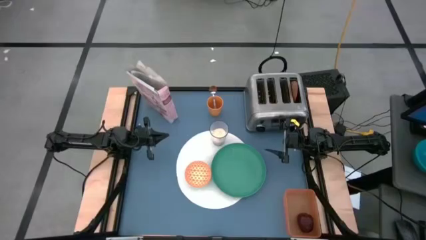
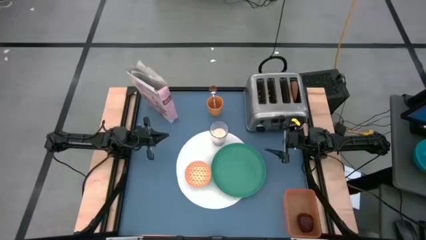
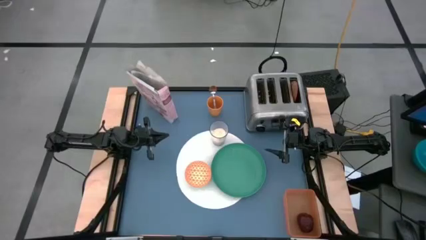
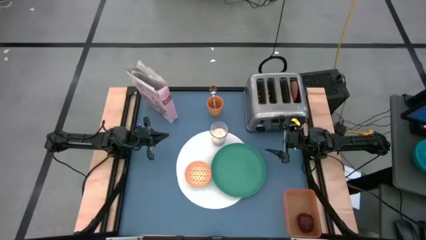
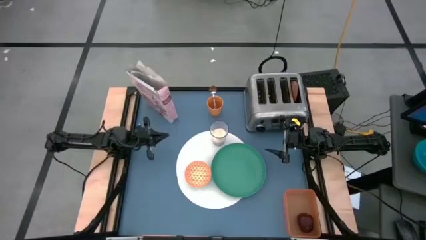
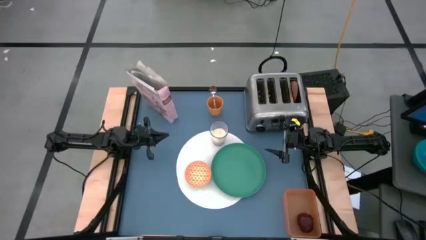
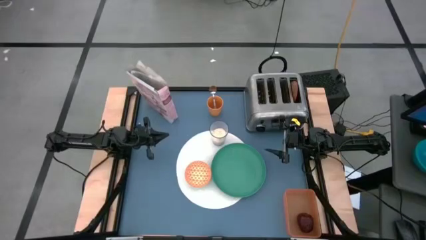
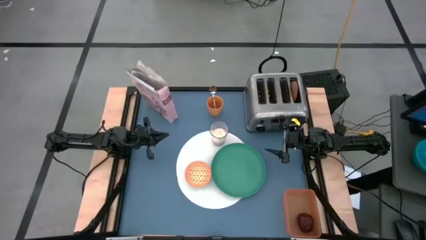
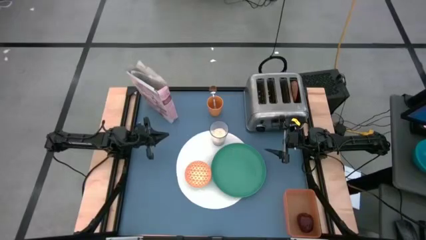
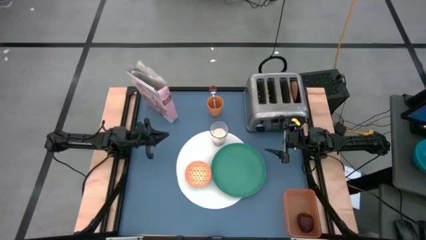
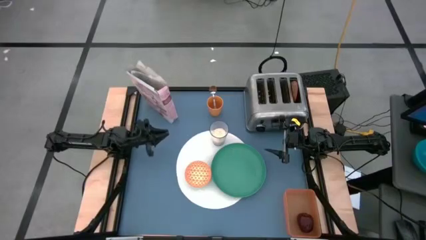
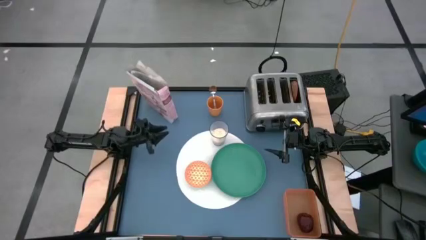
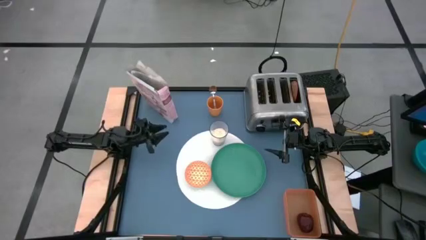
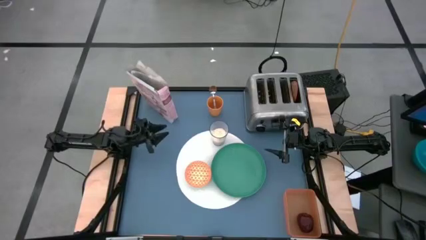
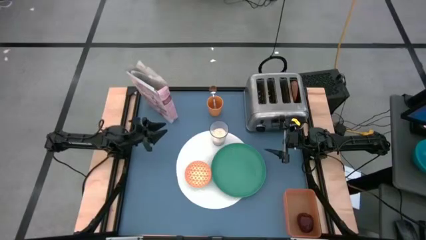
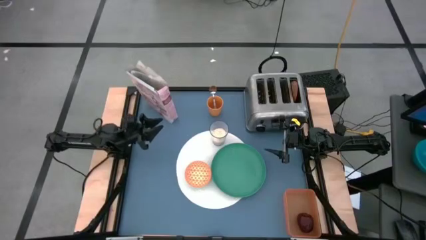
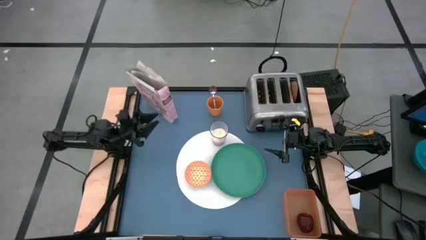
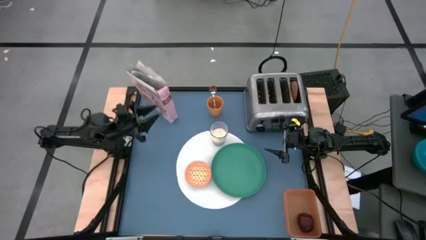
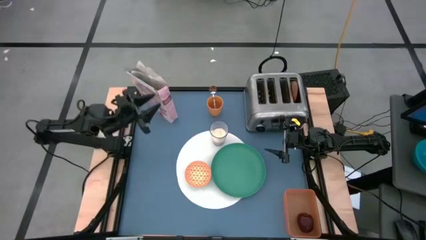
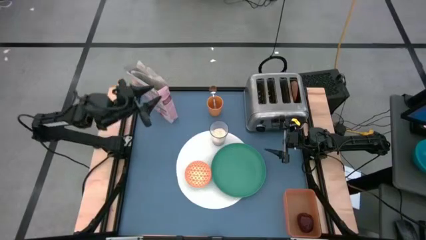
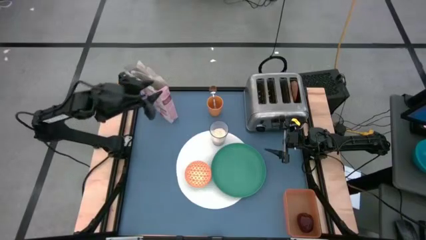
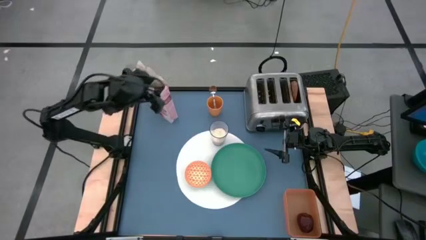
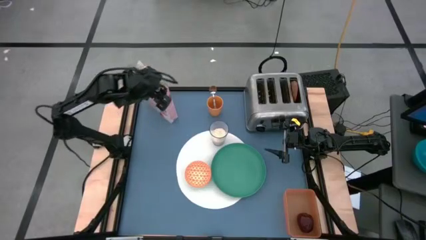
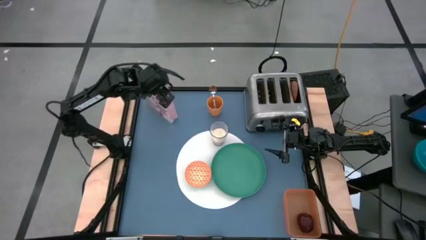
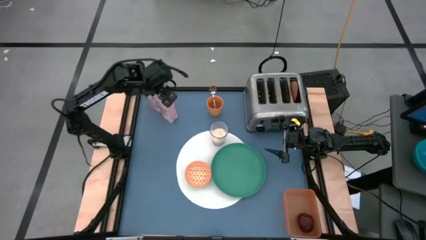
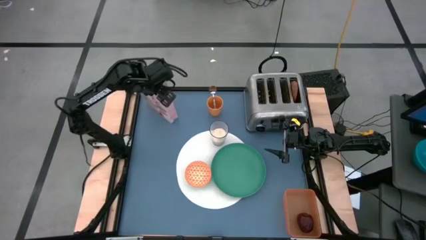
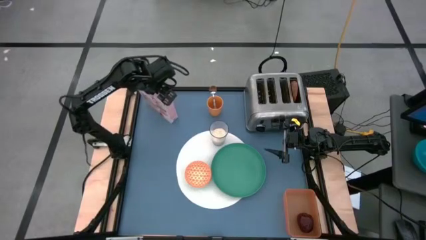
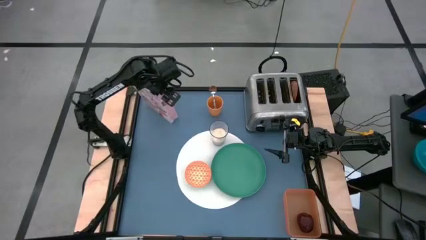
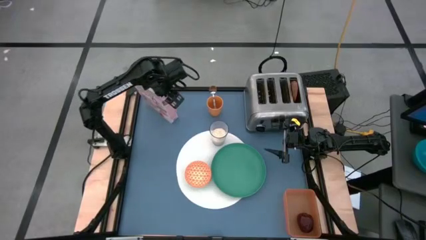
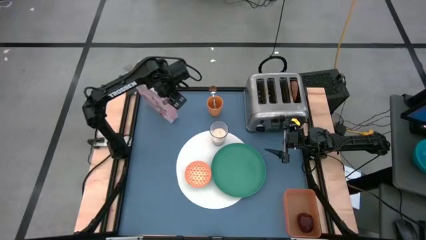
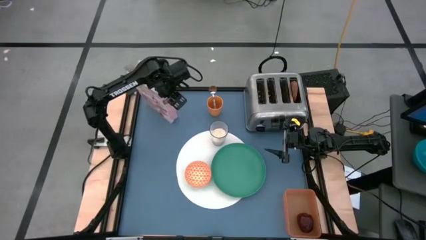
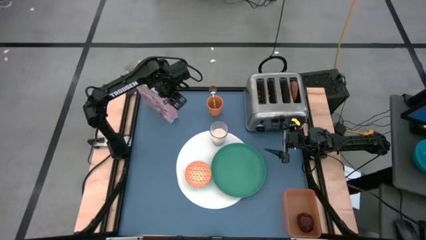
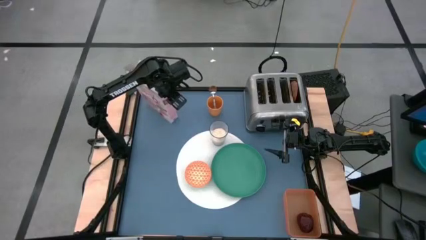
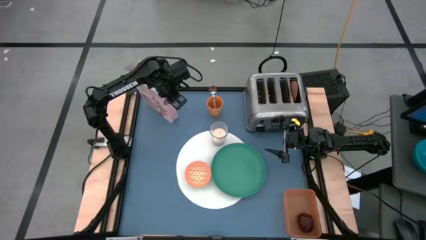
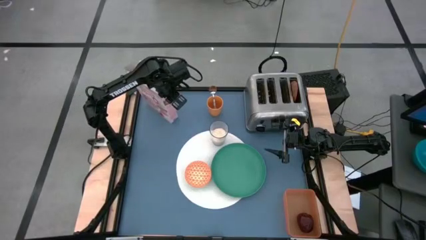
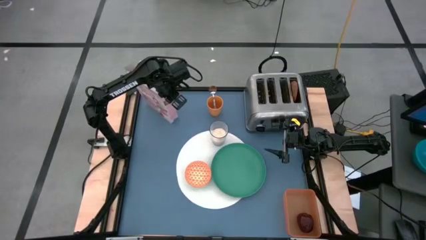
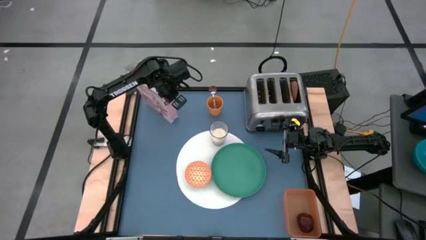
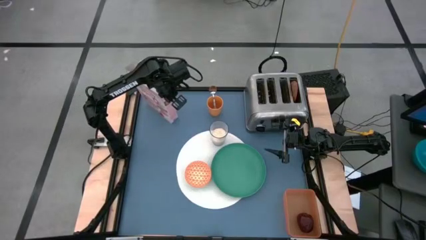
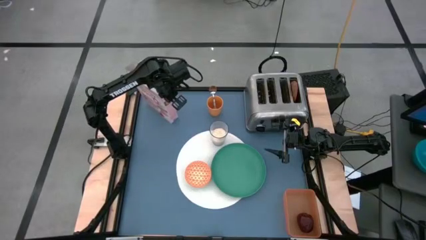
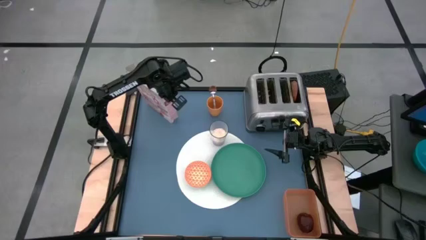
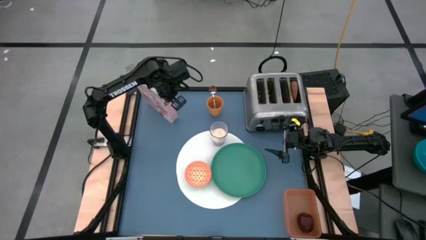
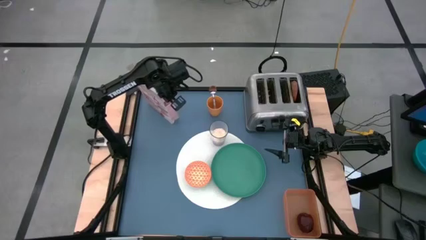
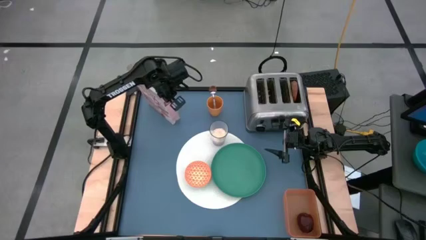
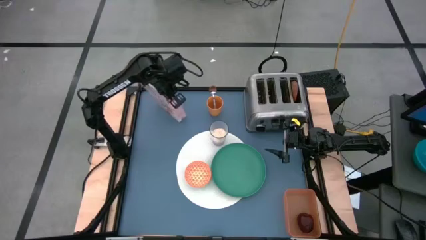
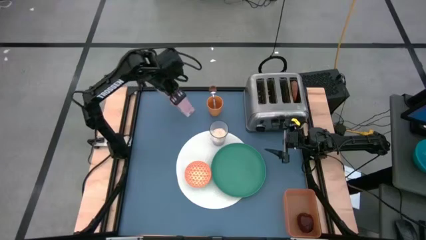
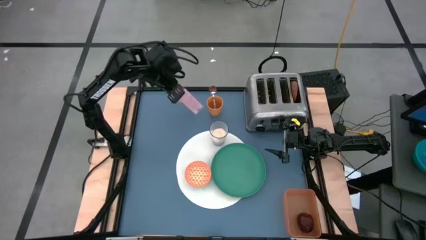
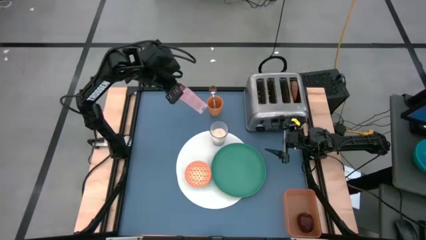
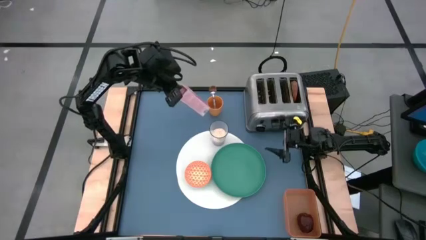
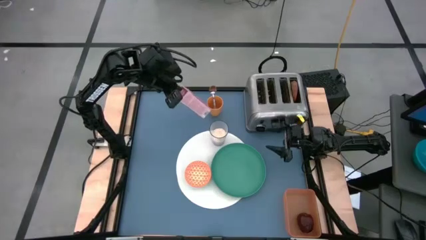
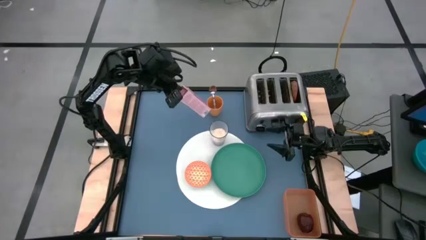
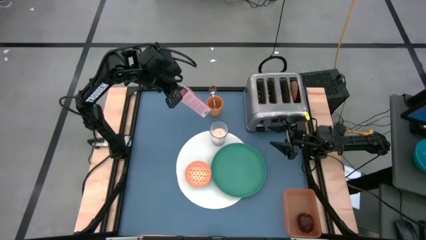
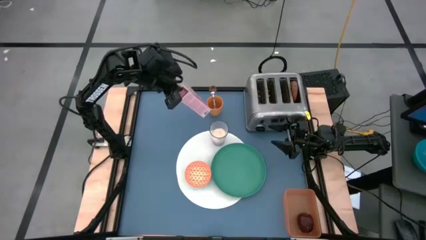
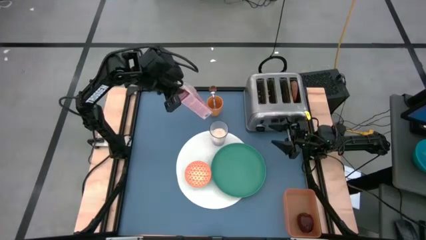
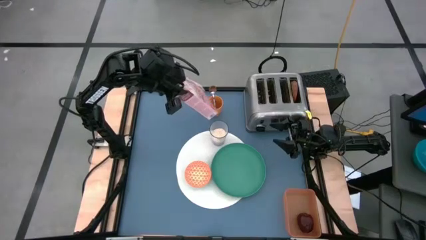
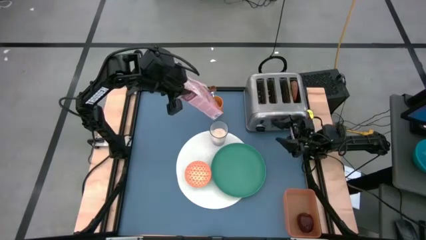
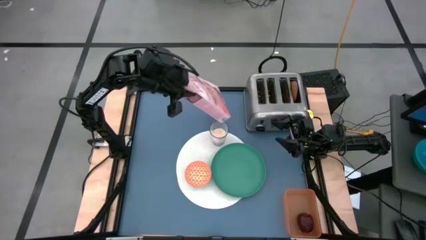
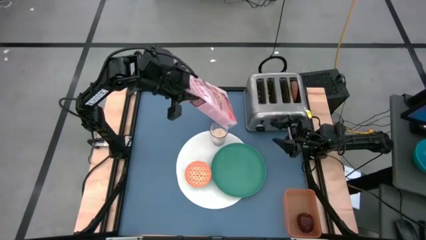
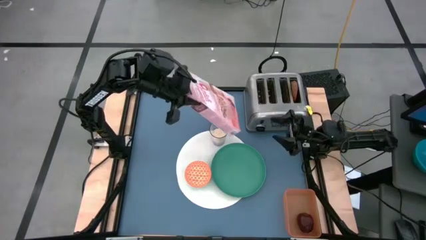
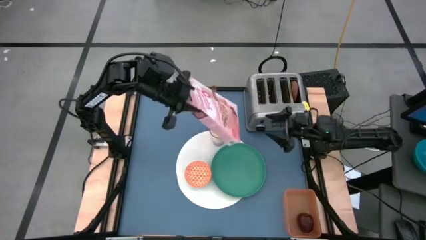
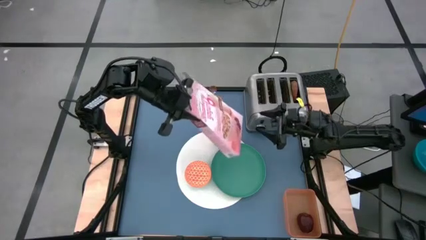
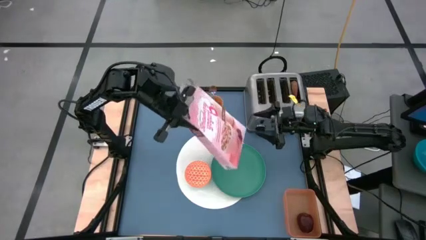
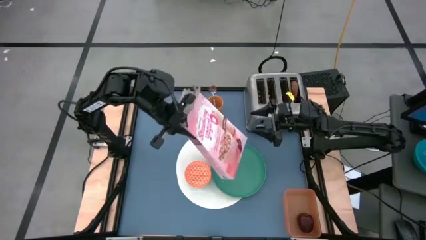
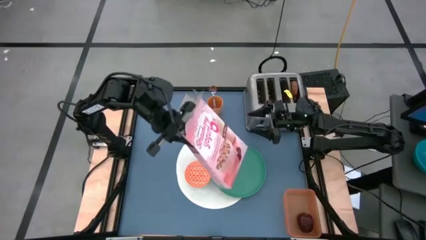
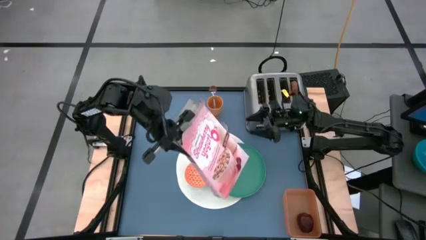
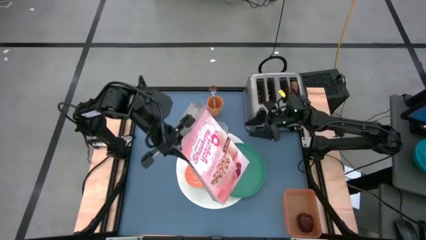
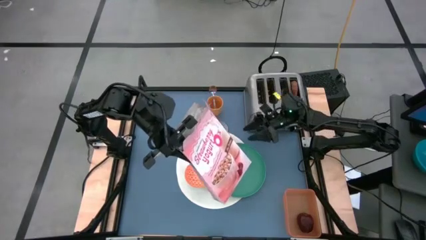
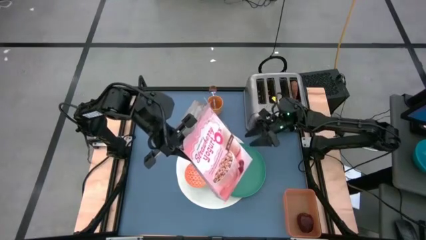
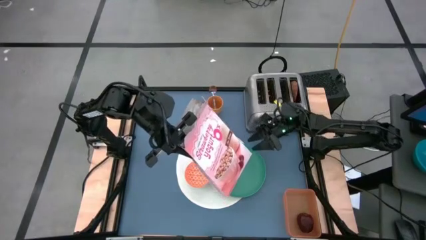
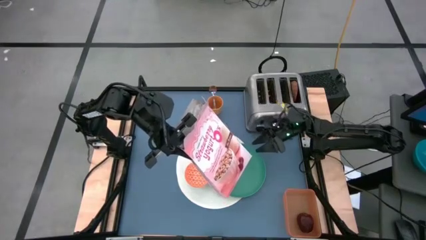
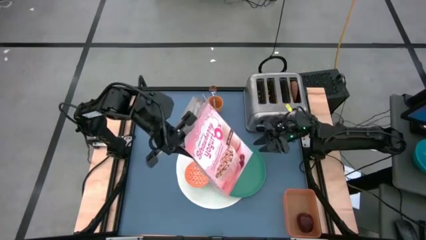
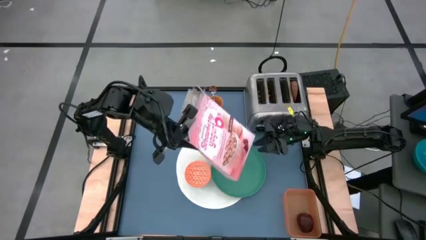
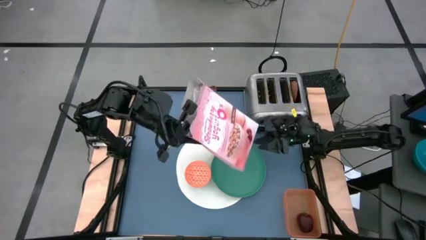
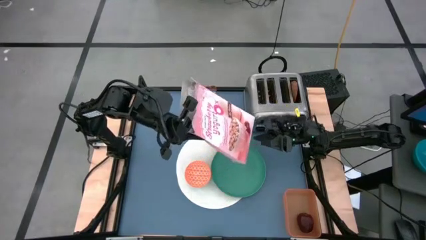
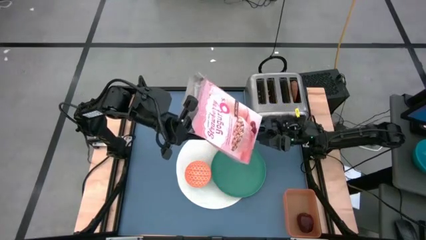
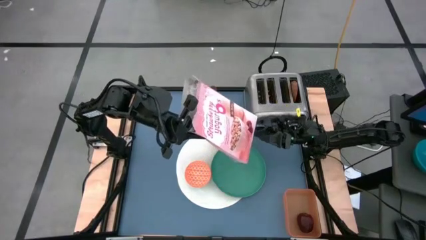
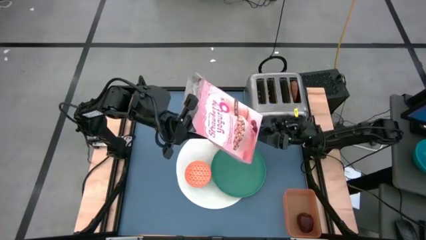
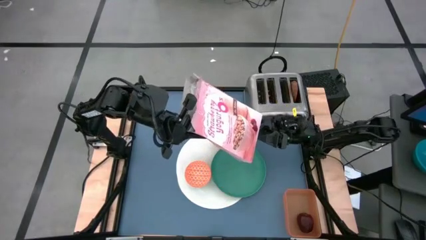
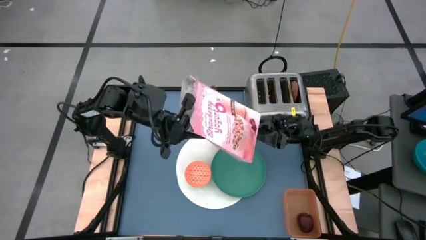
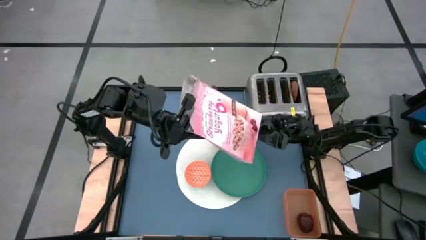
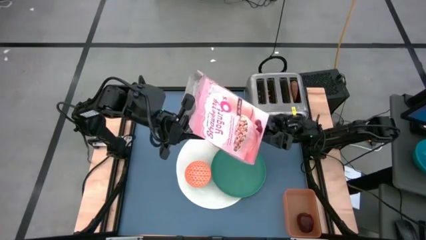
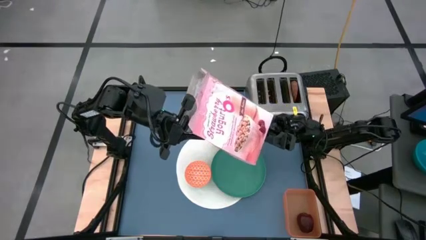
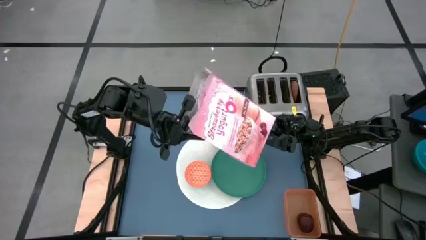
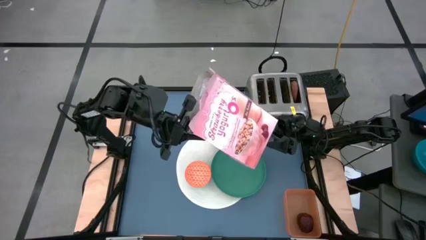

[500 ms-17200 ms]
Task: Arrange a breakfast setting
Pour the cereal into the orange bowl
